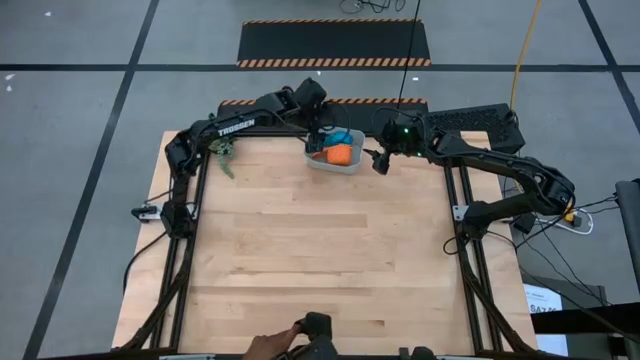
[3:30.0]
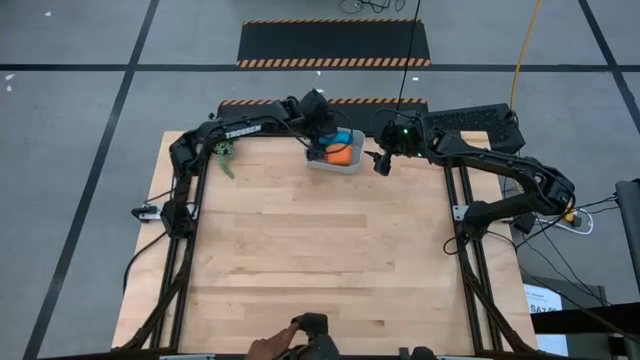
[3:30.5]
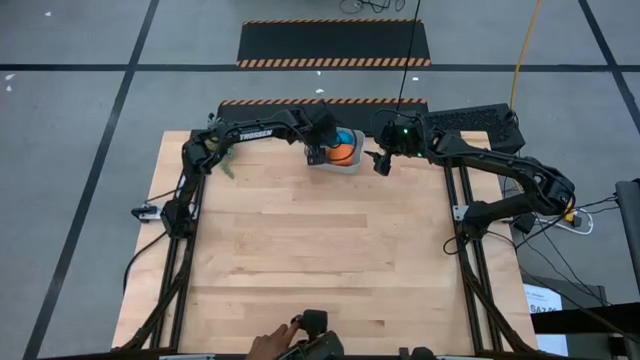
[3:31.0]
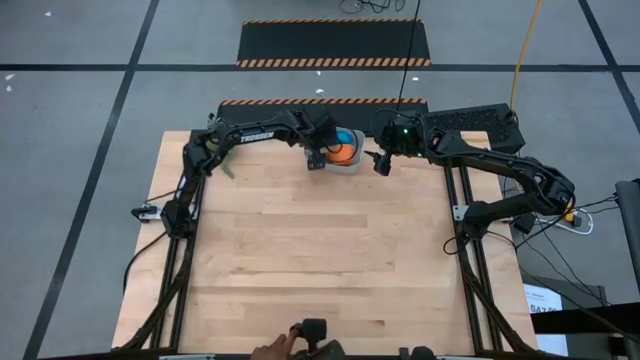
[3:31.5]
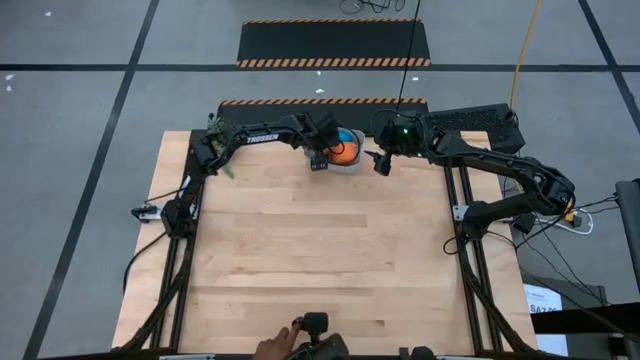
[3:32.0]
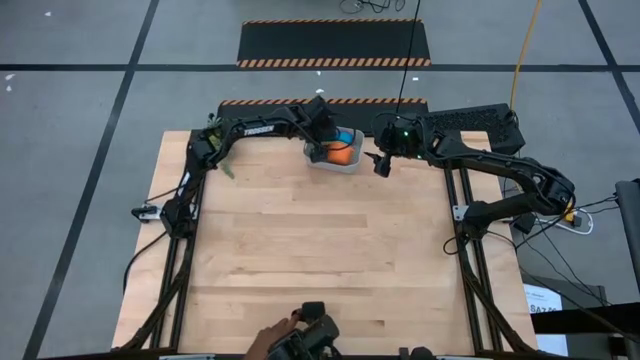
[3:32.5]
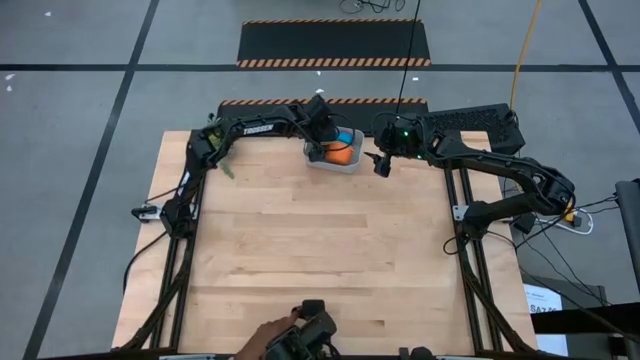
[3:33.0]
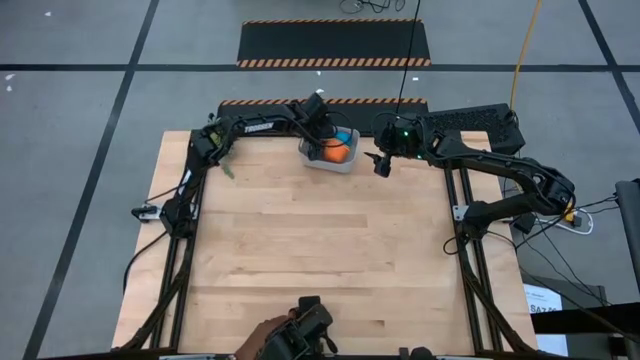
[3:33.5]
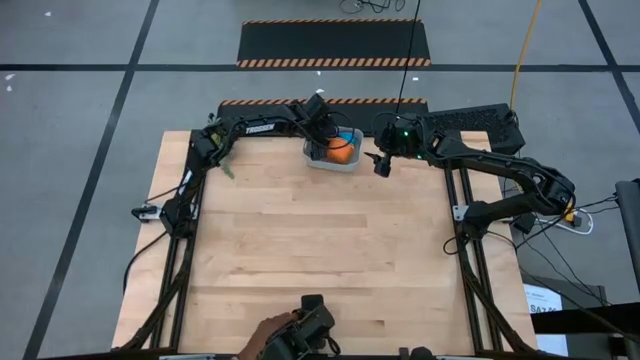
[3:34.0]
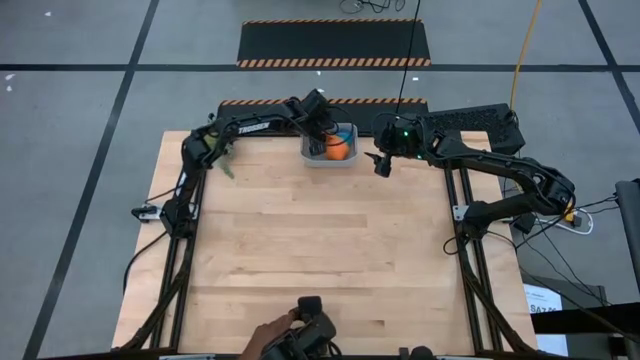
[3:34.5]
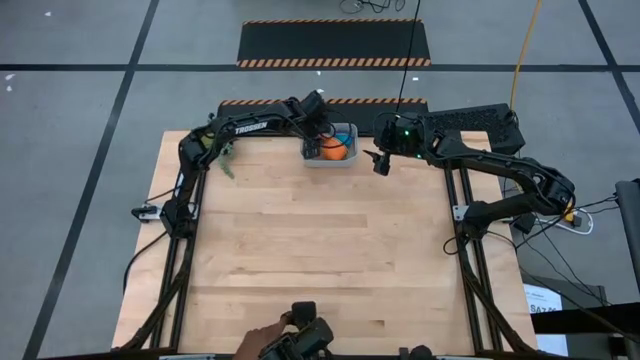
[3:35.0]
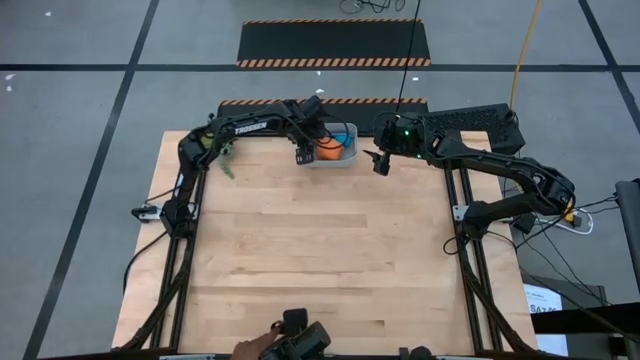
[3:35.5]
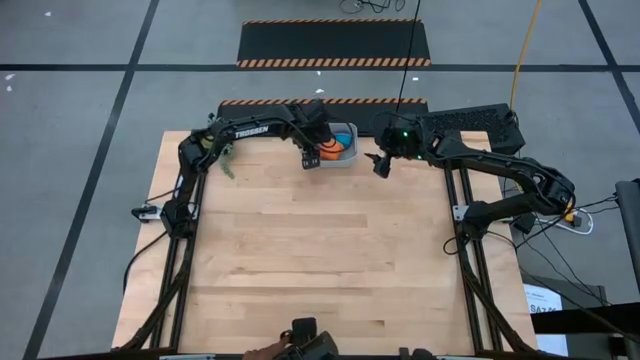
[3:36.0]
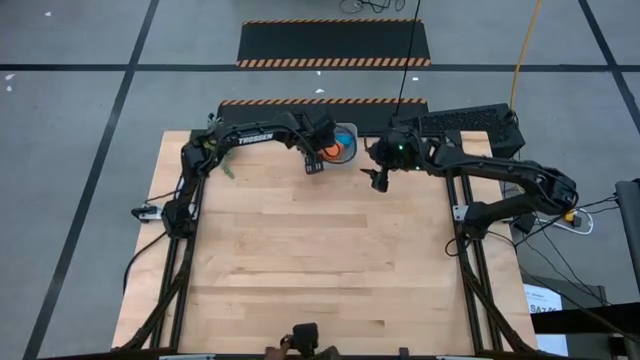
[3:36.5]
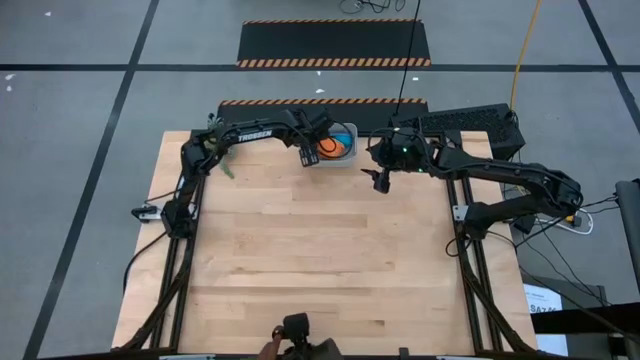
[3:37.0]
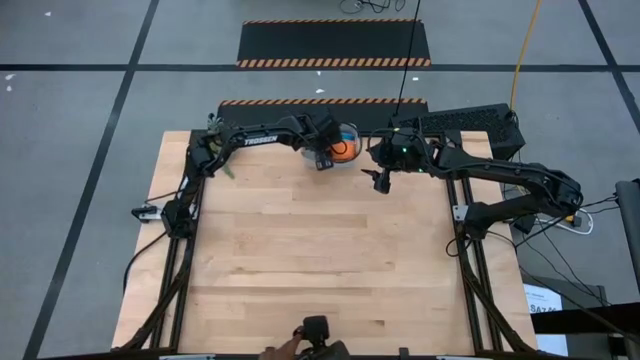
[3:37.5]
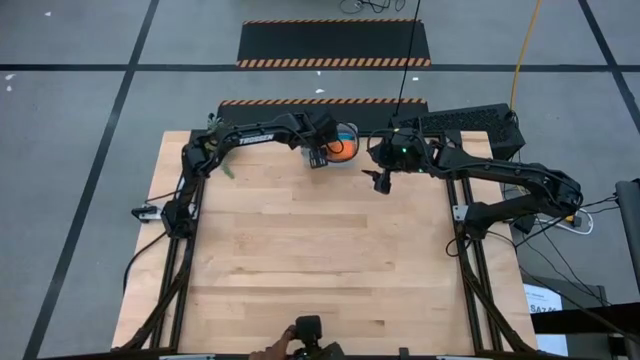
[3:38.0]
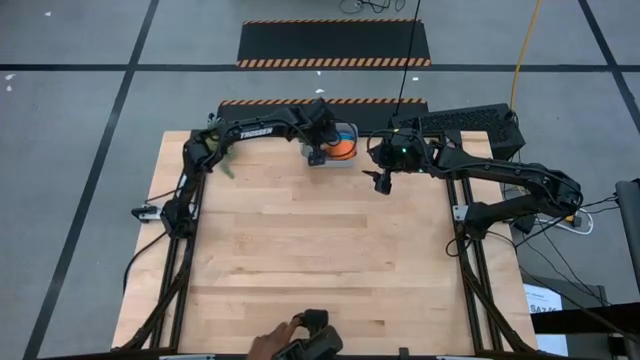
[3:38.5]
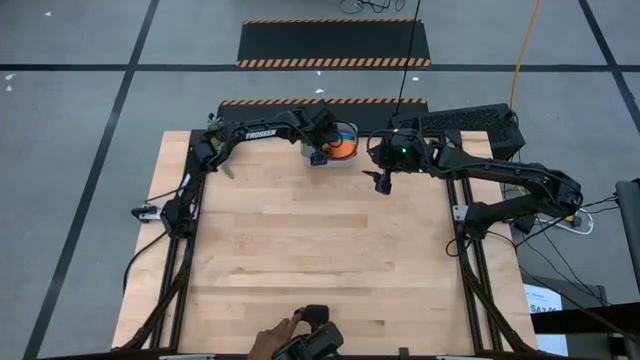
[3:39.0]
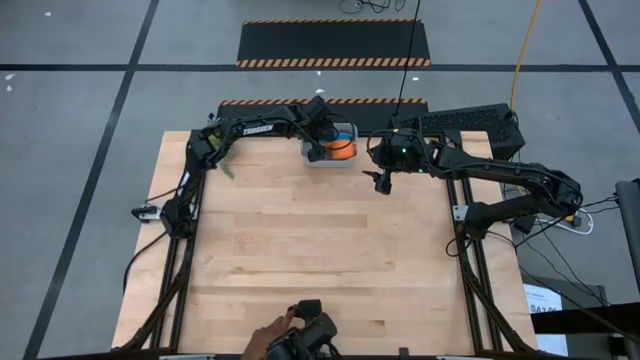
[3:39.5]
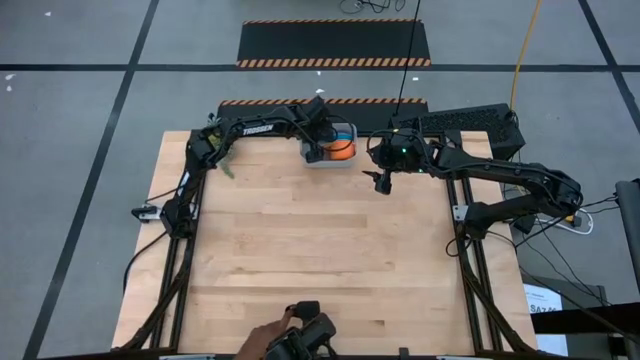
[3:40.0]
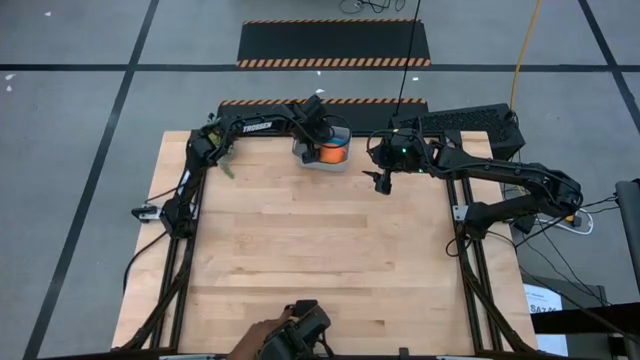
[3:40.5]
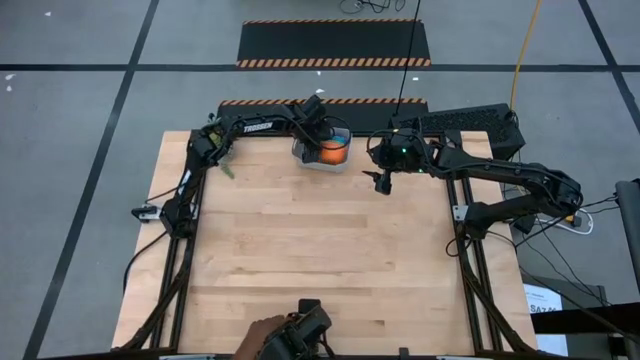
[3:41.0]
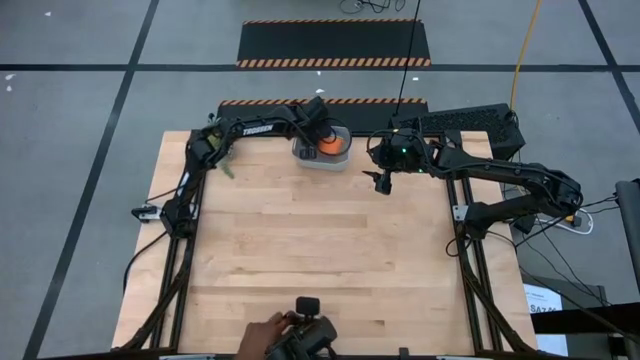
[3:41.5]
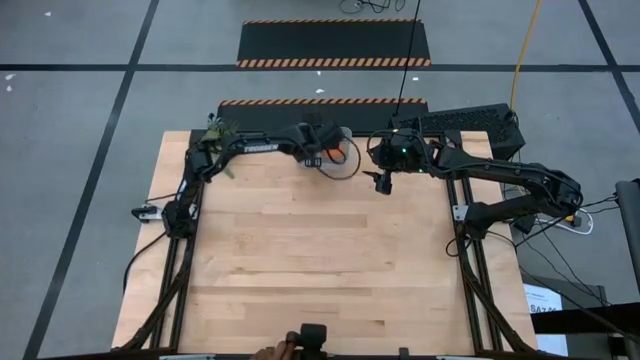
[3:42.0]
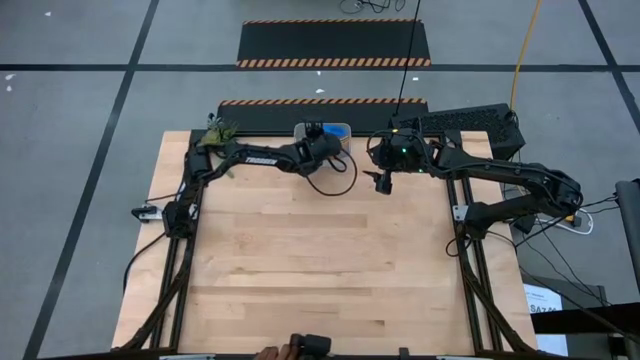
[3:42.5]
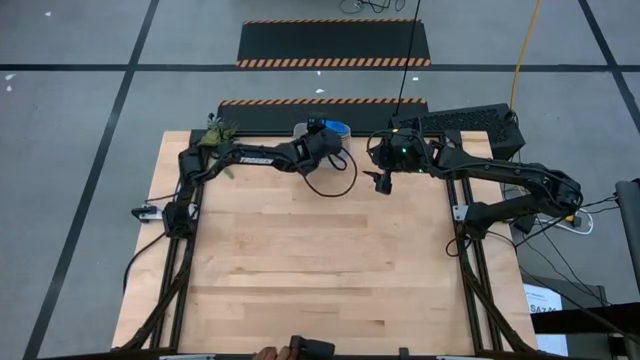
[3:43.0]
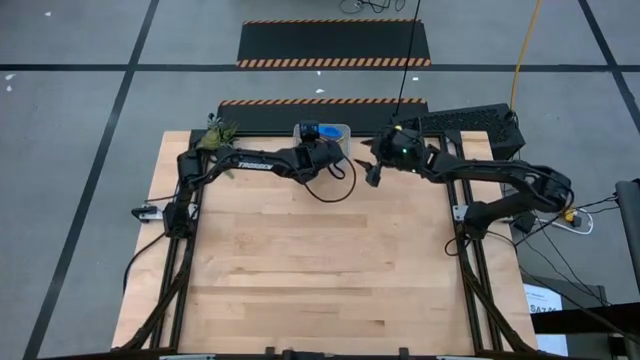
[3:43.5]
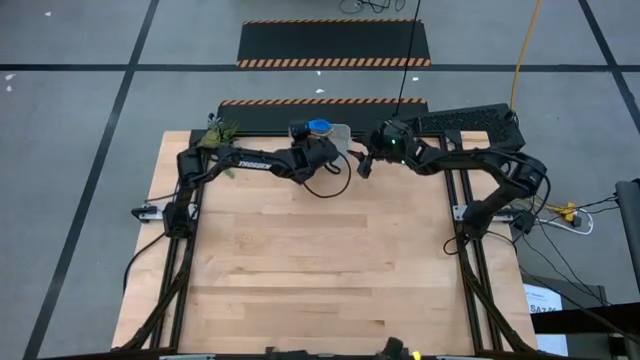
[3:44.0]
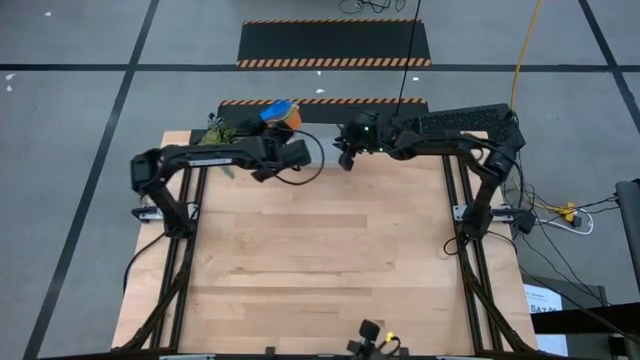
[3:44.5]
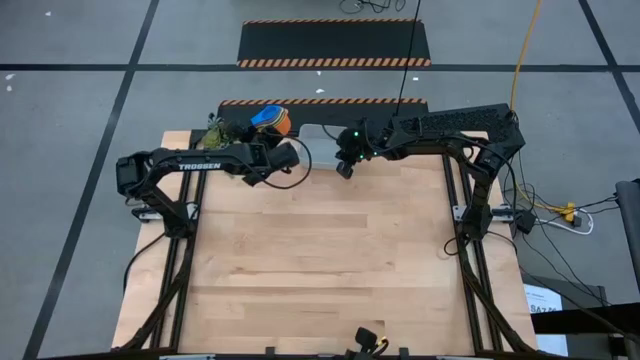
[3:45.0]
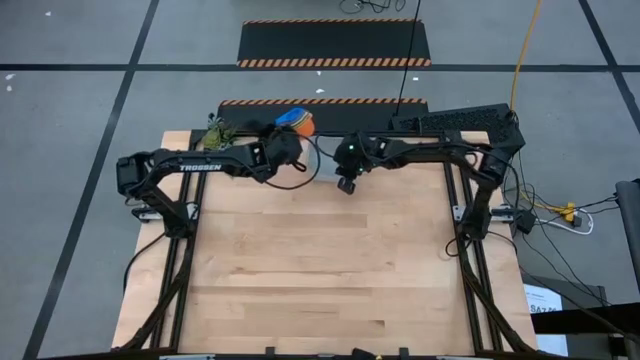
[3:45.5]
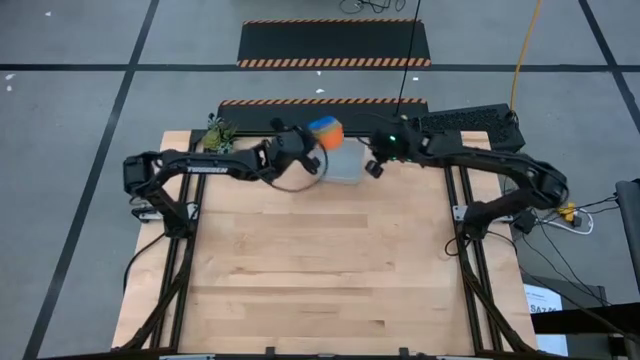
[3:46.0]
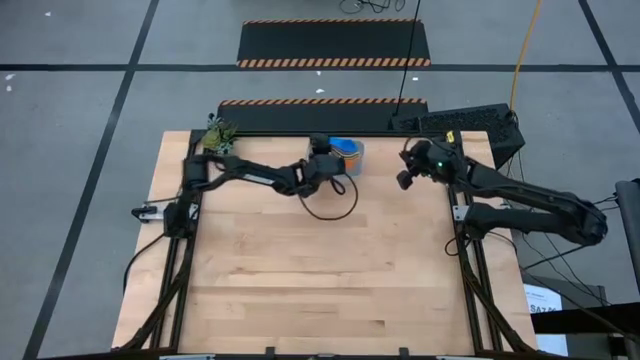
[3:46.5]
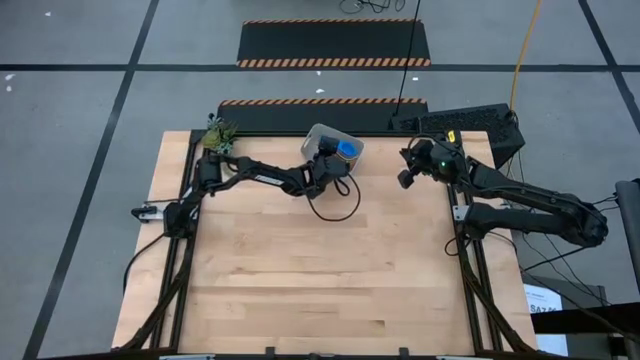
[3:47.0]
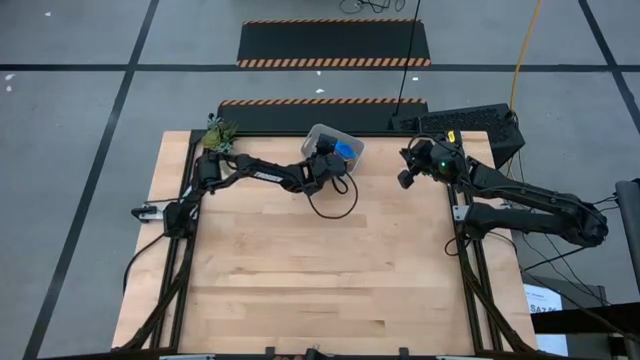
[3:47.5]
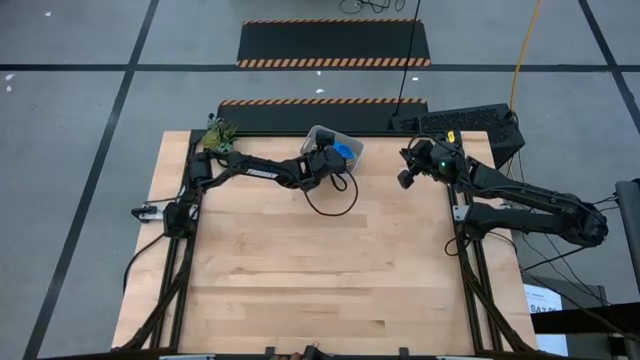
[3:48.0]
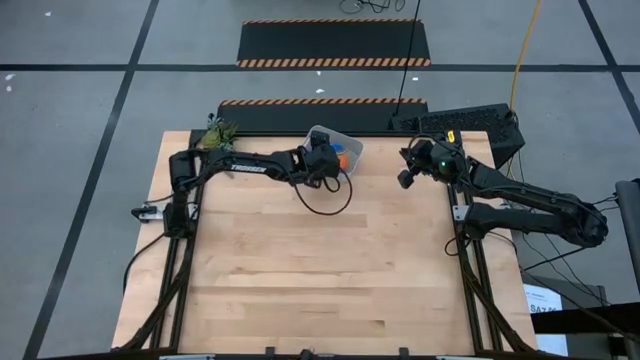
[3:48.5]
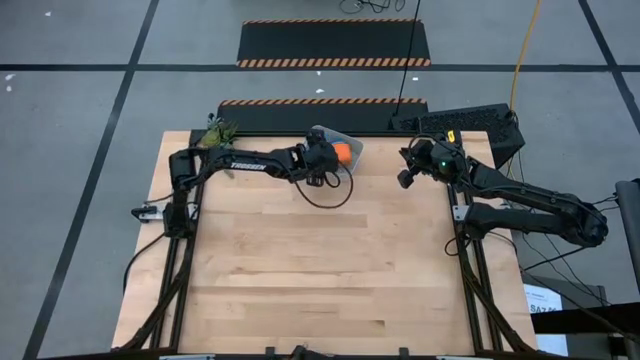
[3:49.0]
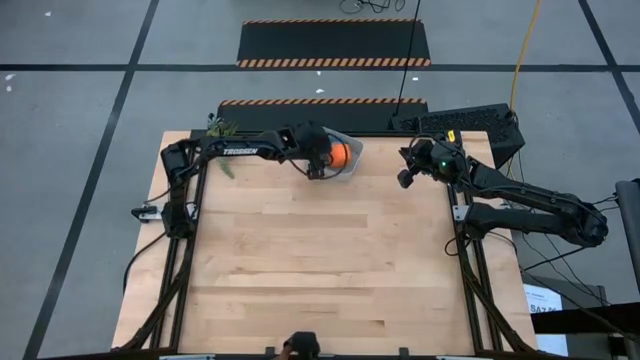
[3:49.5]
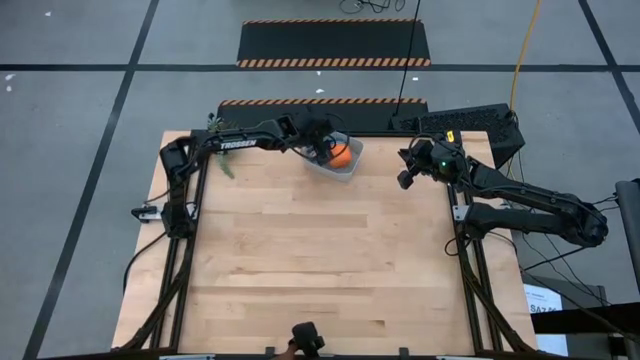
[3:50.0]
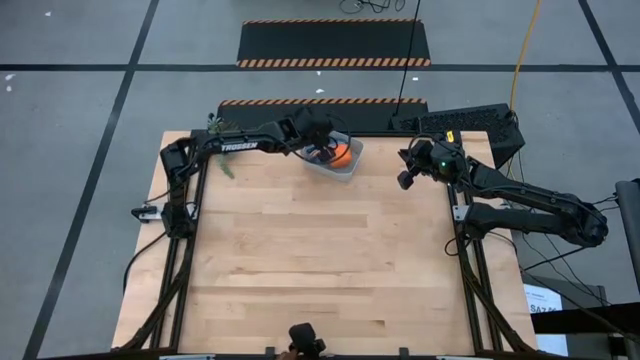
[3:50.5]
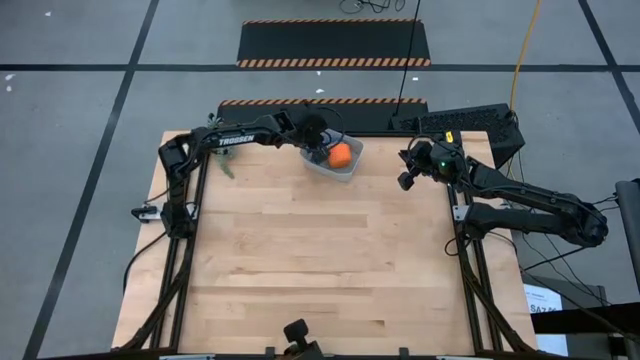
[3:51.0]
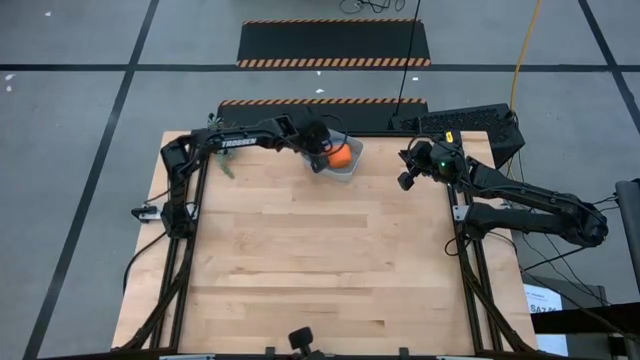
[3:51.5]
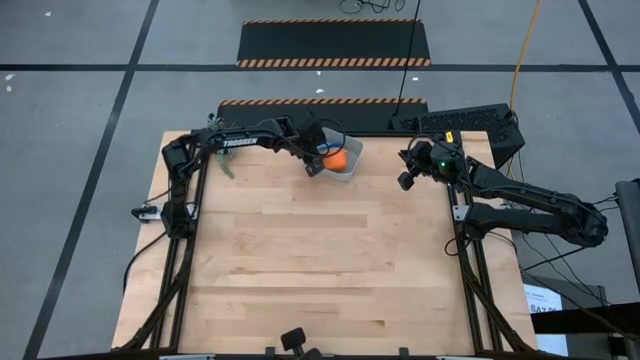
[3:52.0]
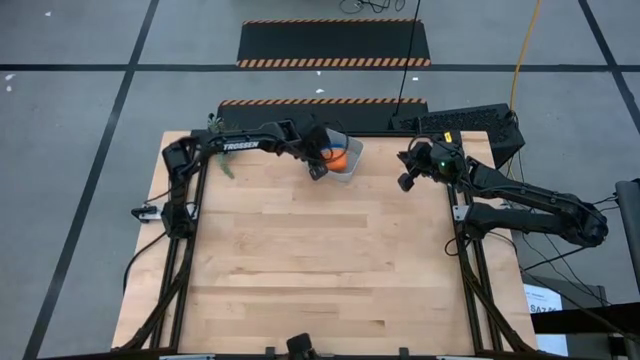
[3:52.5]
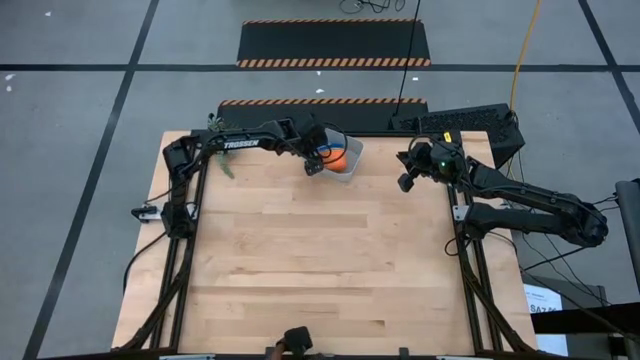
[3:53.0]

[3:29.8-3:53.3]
Task: Nest measuring cups in basket
Put the stack of measuring cups into the gray bin
